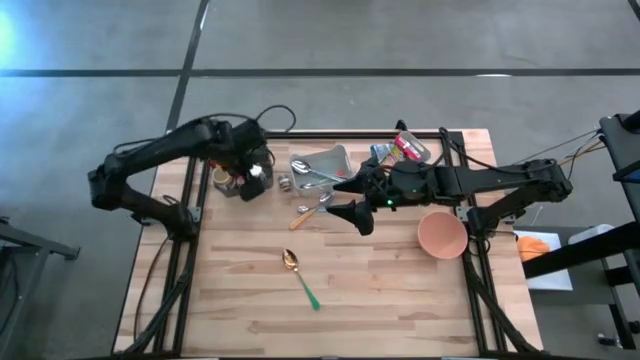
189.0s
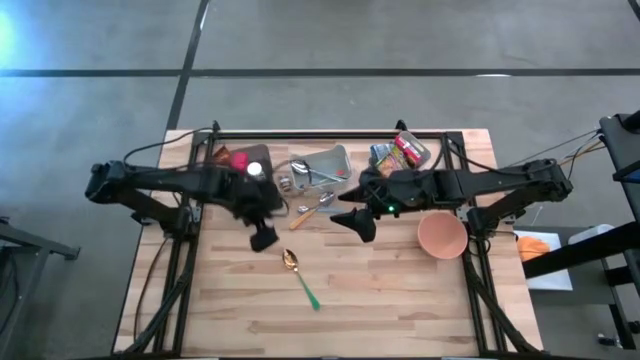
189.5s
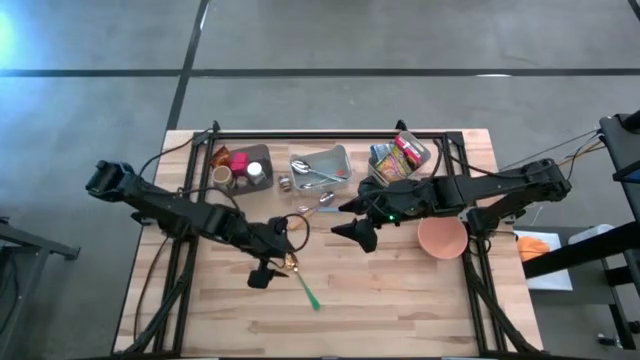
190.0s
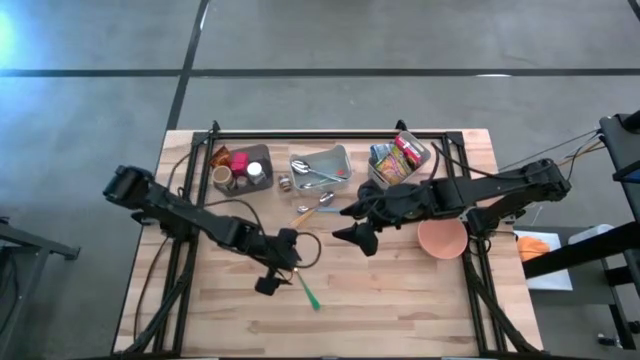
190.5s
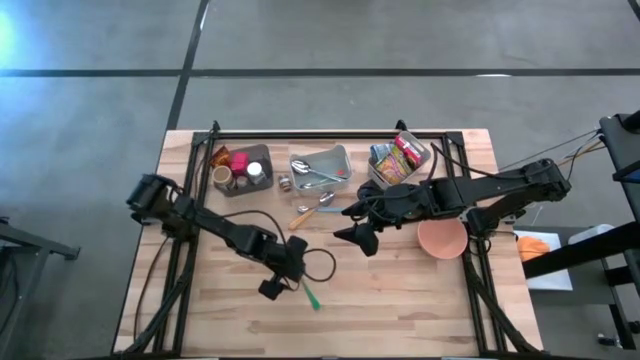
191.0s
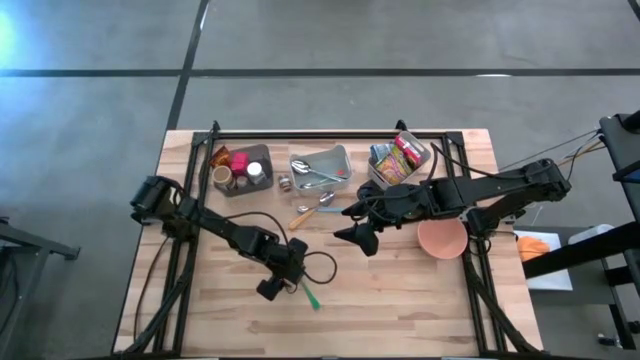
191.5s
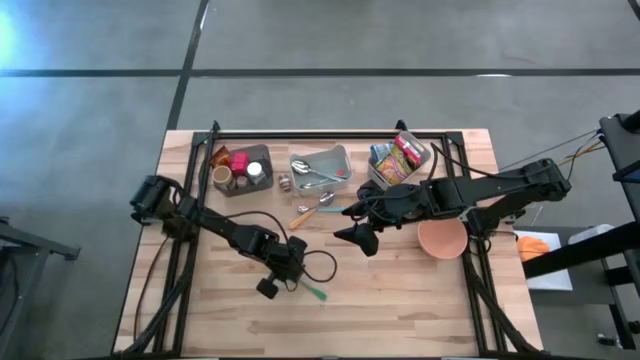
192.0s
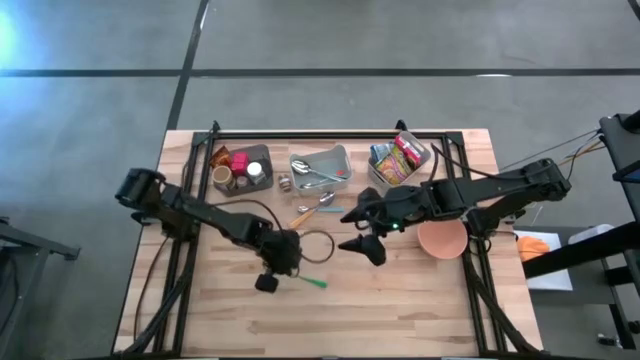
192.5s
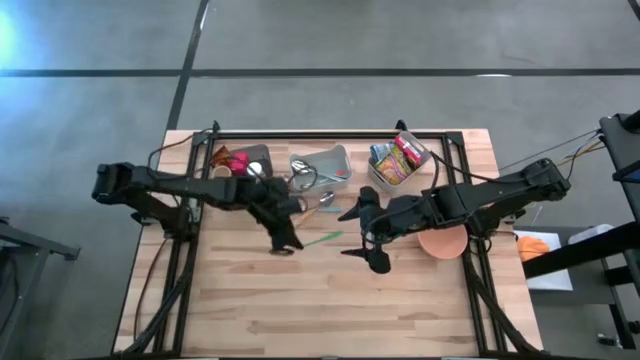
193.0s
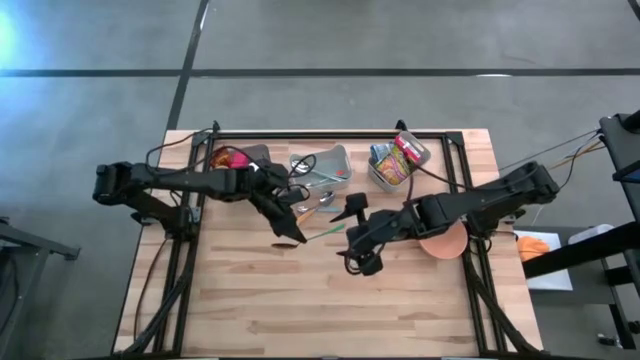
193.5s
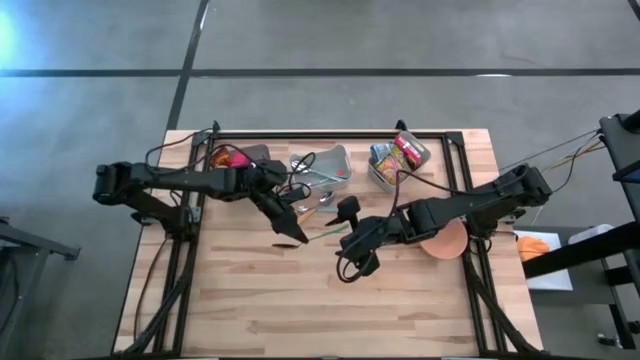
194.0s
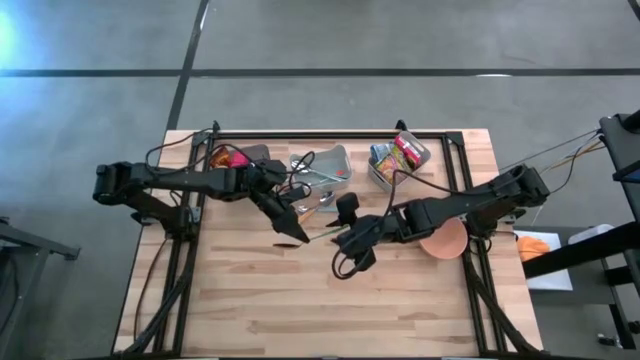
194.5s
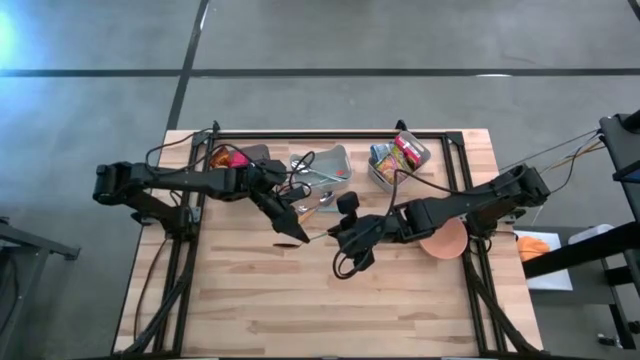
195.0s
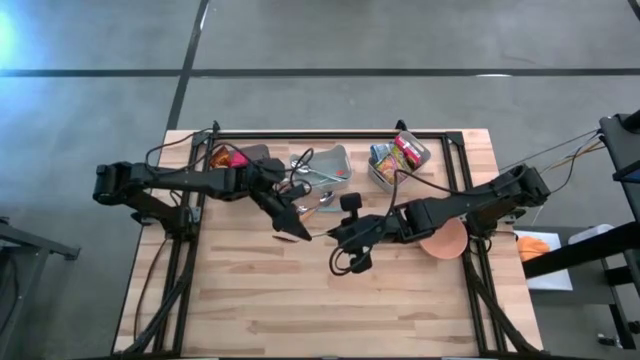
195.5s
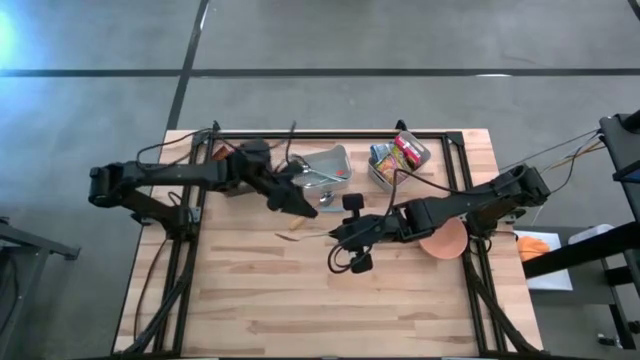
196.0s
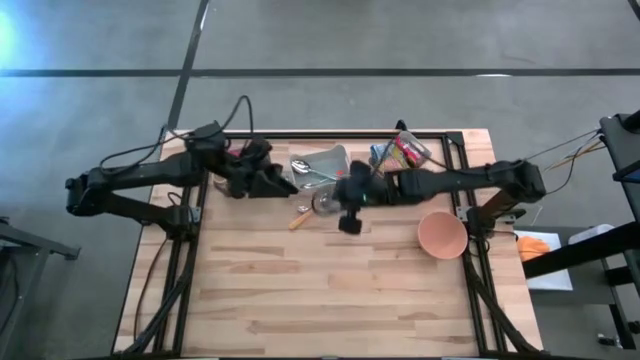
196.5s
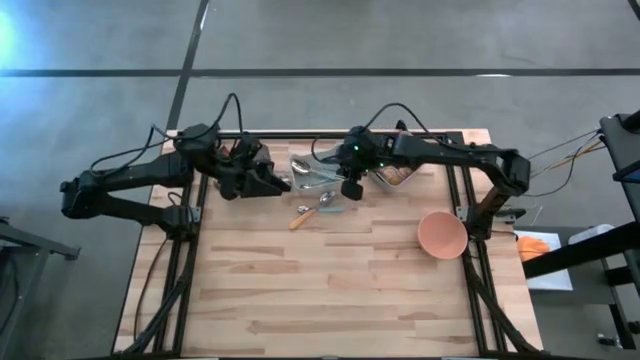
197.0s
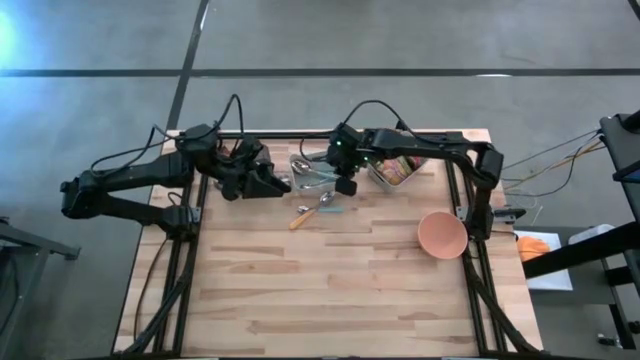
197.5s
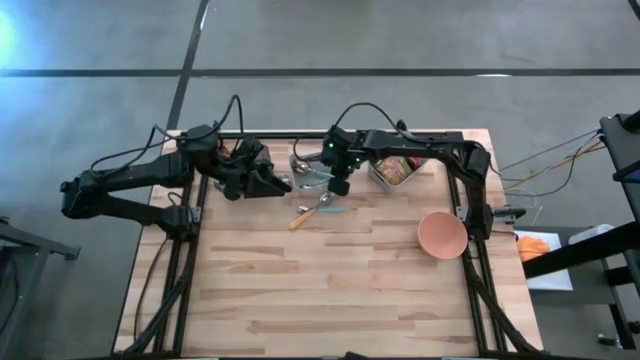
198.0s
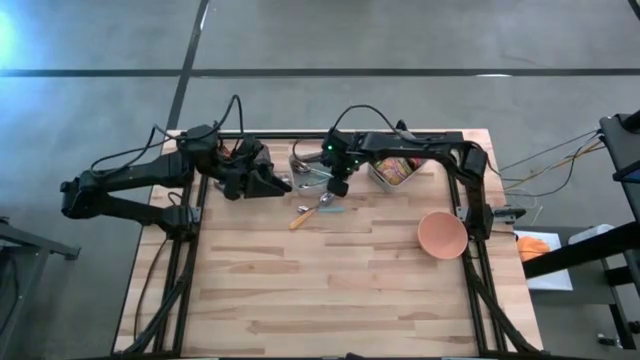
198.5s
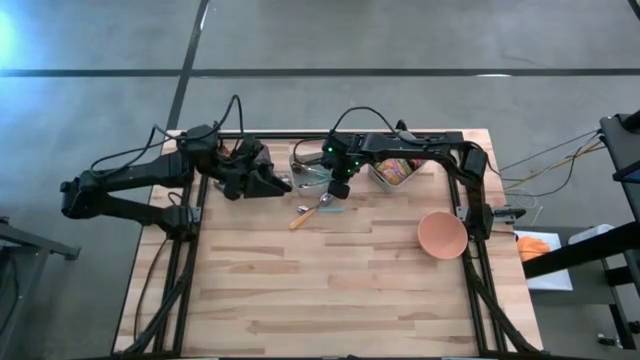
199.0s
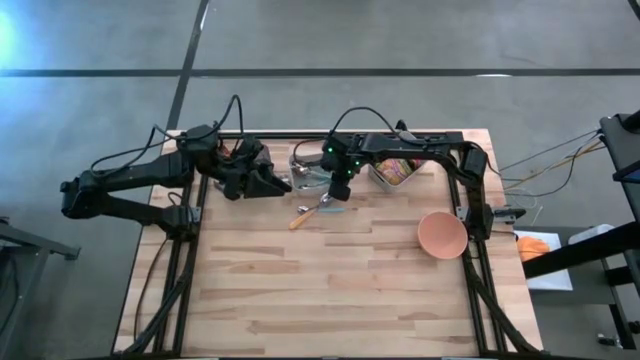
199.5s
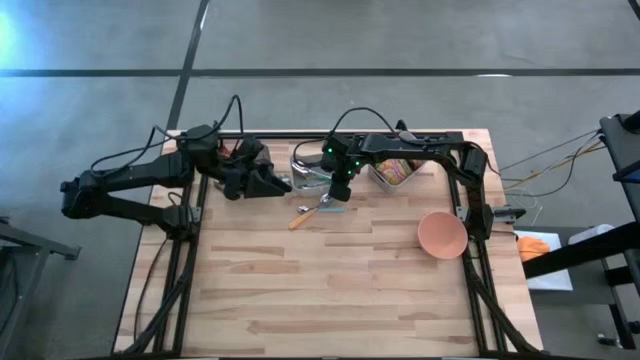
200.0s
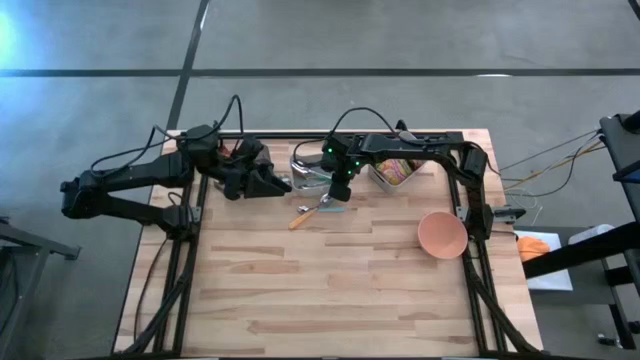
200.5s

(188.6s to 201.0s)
Put the green spoon into the right gray bin

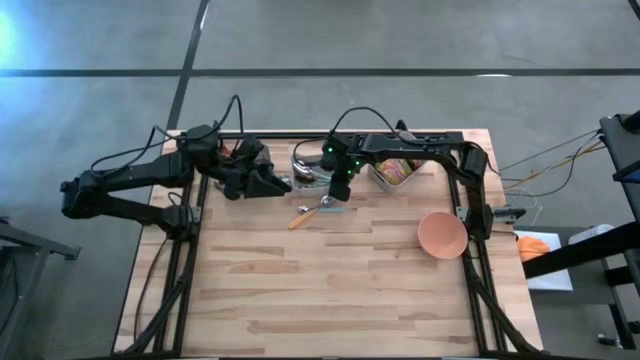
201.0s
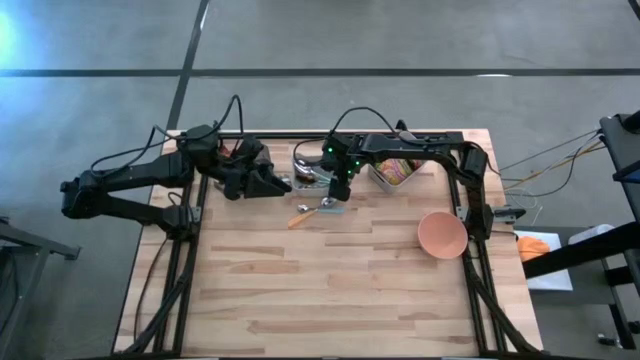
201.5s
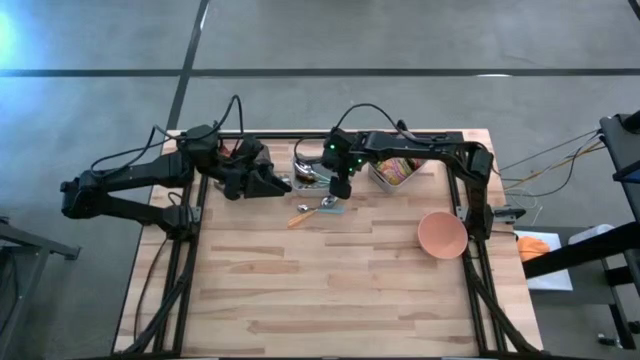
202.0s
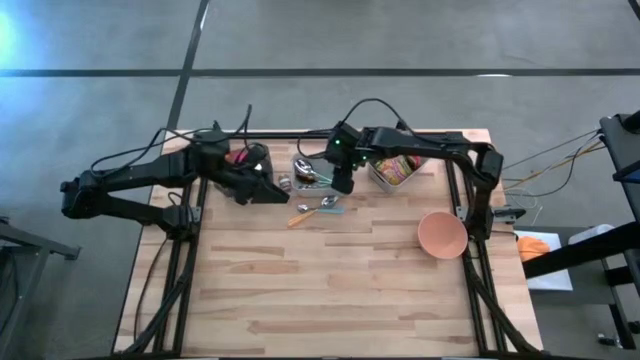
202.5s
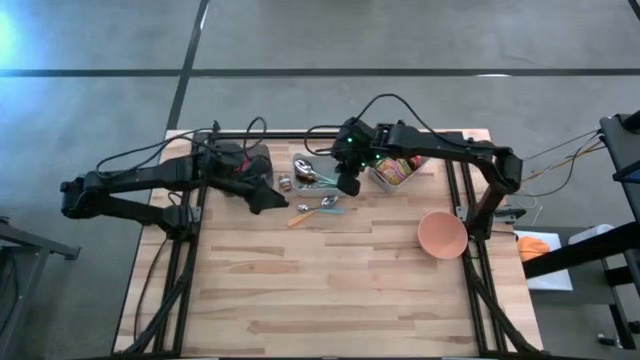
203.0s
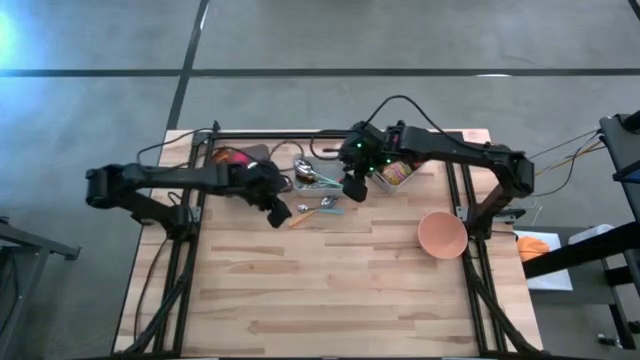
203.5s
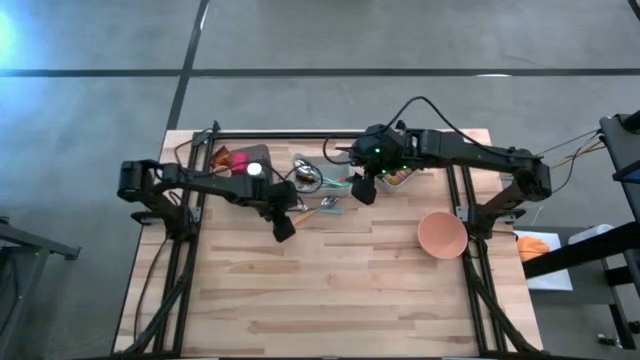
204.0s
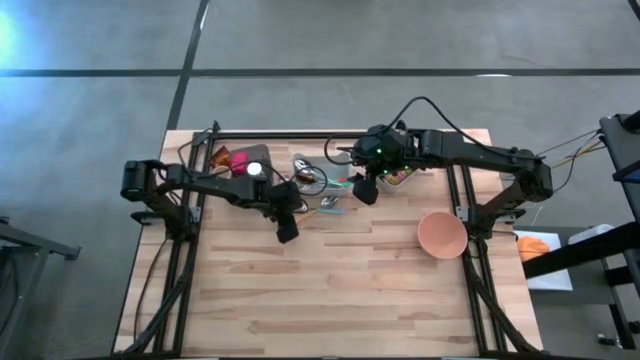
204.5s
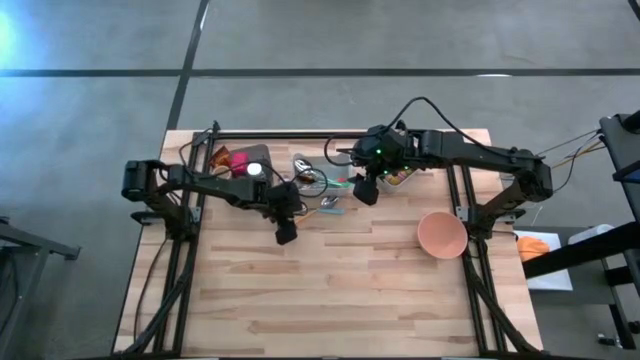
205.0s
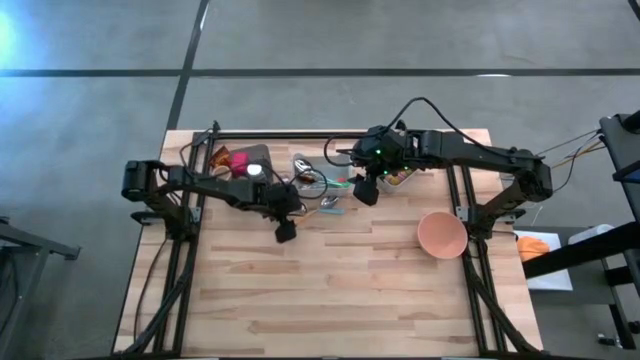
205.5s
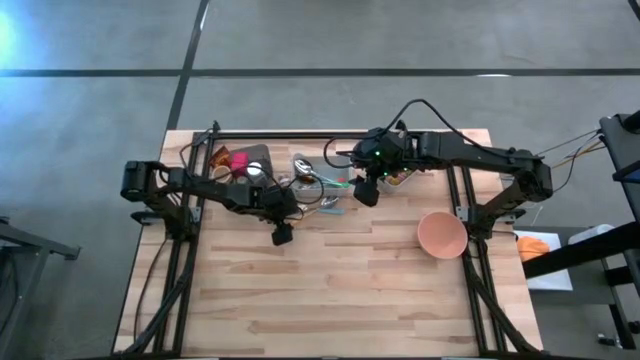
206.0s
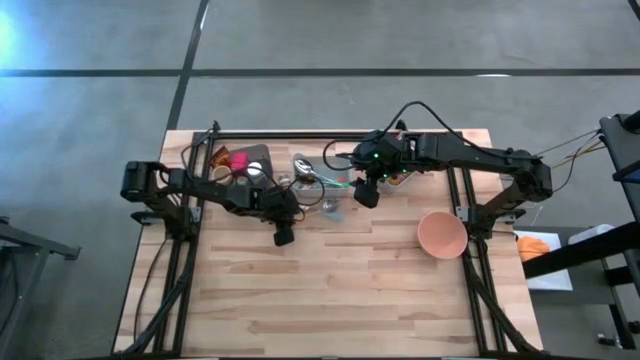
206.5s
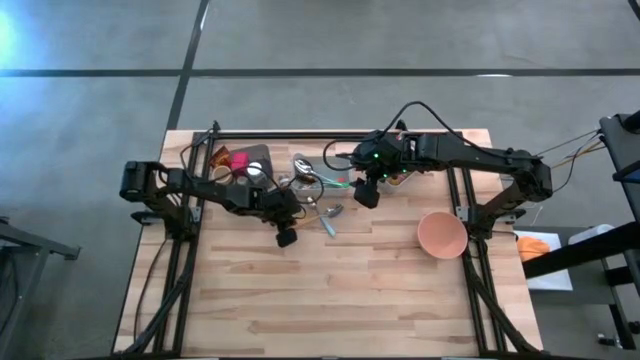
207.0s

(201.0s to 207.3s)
Put the orange spoon into the right gray bin
